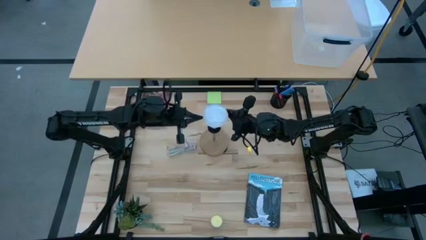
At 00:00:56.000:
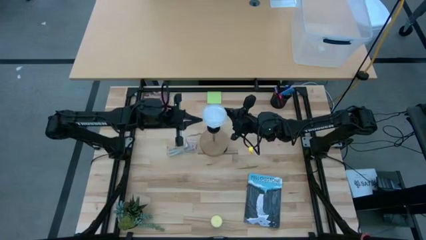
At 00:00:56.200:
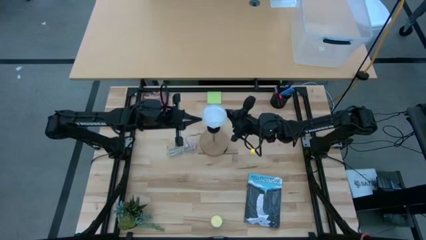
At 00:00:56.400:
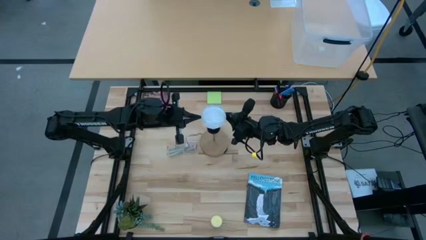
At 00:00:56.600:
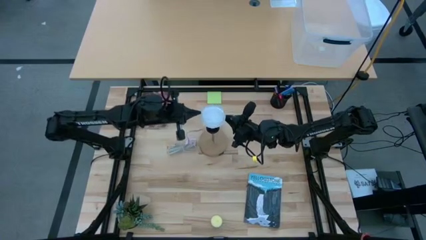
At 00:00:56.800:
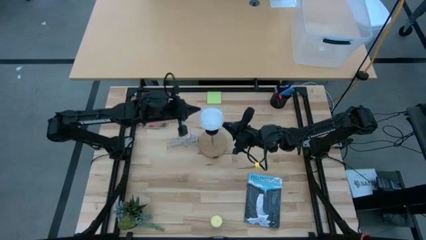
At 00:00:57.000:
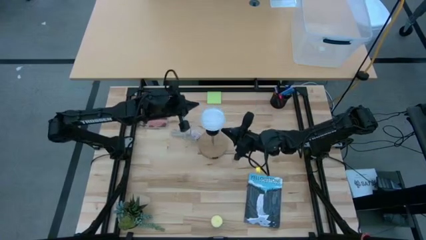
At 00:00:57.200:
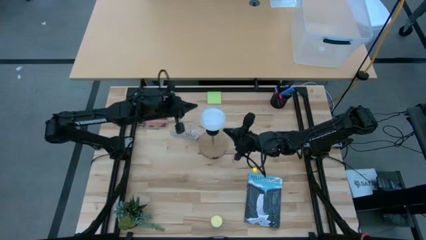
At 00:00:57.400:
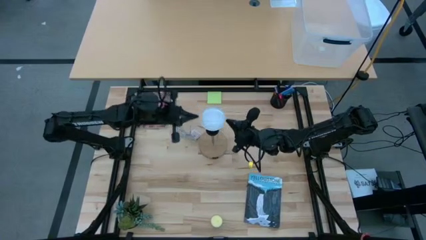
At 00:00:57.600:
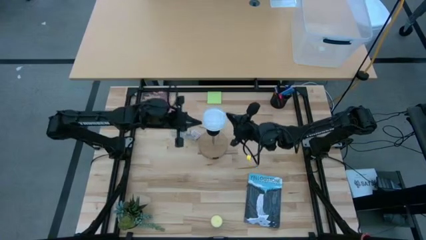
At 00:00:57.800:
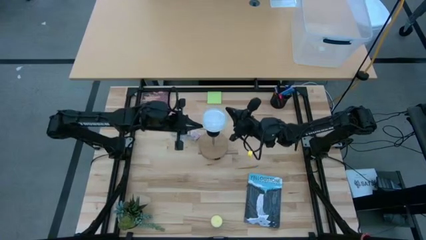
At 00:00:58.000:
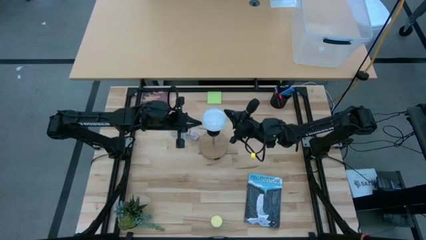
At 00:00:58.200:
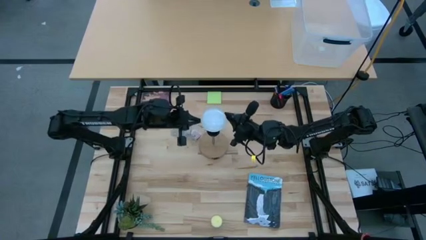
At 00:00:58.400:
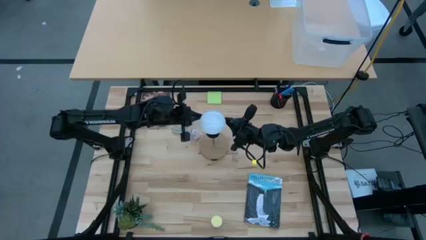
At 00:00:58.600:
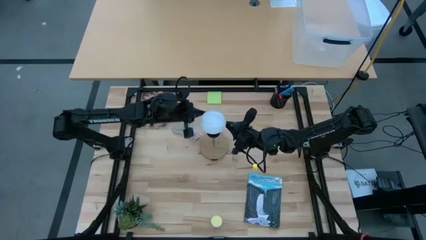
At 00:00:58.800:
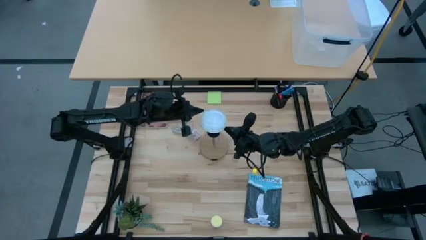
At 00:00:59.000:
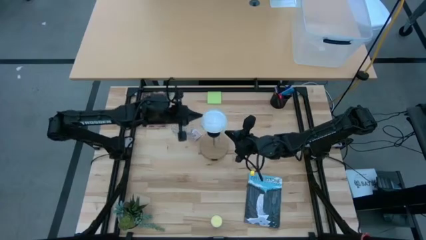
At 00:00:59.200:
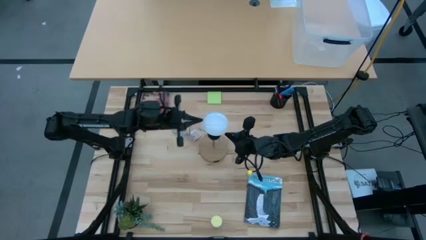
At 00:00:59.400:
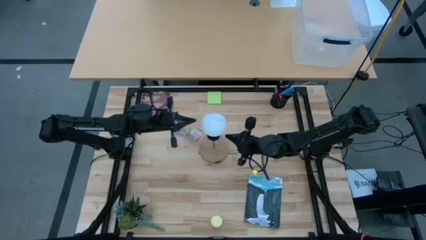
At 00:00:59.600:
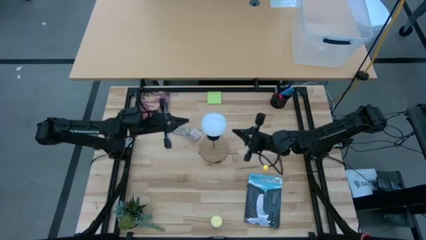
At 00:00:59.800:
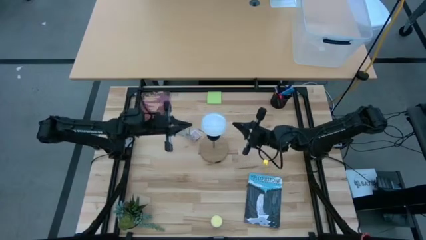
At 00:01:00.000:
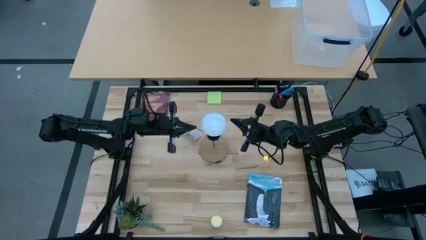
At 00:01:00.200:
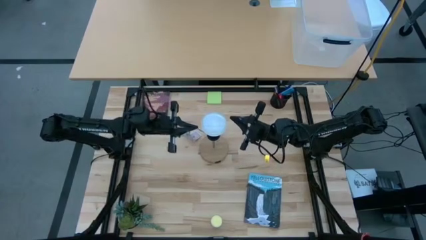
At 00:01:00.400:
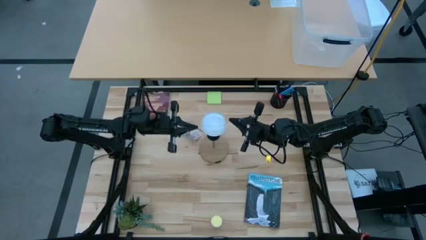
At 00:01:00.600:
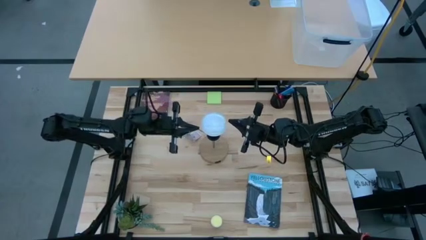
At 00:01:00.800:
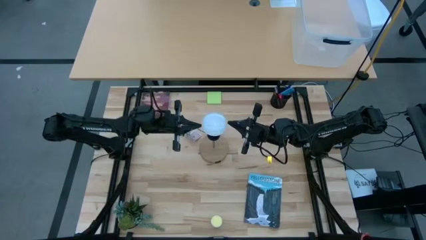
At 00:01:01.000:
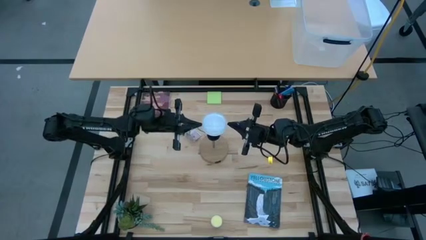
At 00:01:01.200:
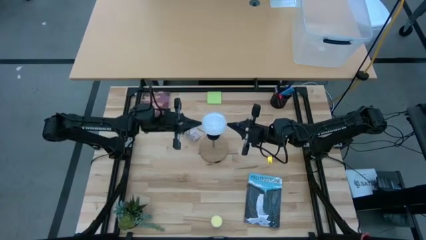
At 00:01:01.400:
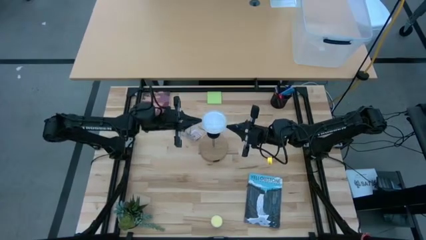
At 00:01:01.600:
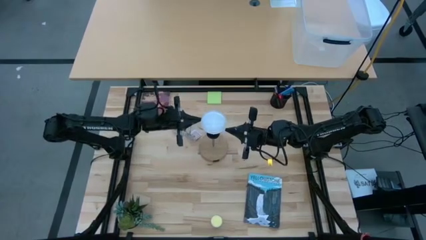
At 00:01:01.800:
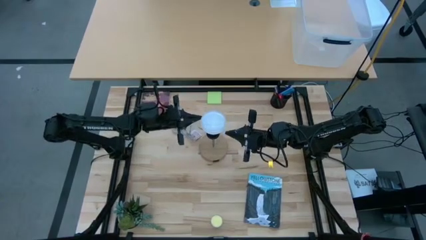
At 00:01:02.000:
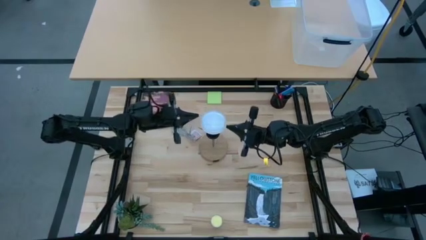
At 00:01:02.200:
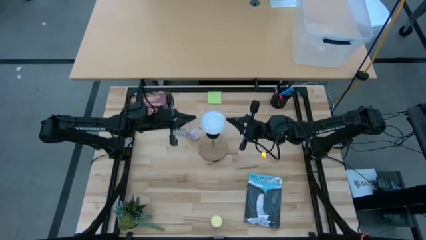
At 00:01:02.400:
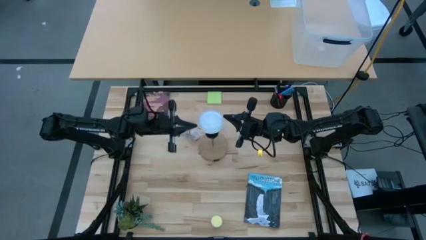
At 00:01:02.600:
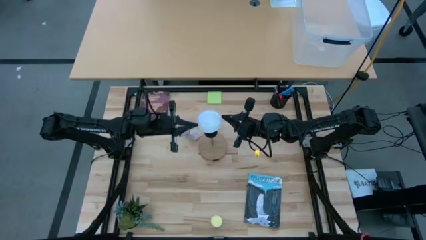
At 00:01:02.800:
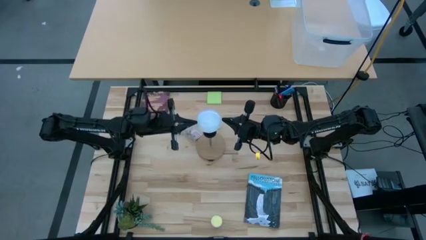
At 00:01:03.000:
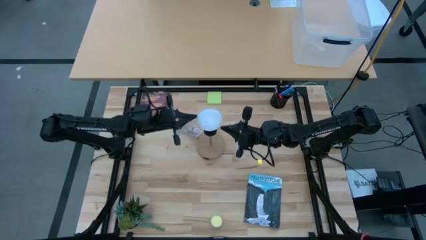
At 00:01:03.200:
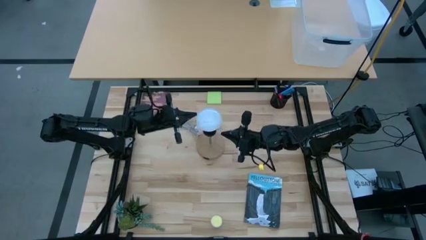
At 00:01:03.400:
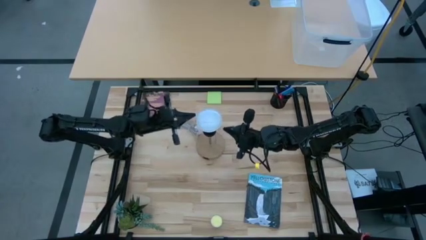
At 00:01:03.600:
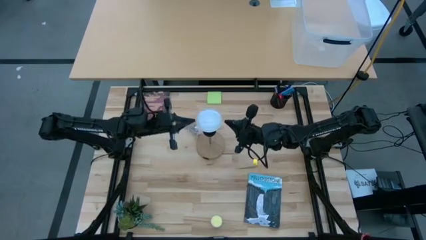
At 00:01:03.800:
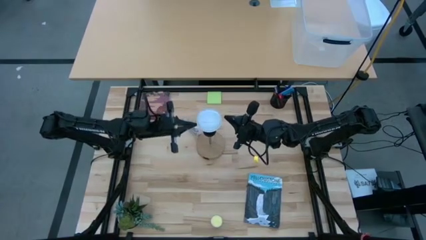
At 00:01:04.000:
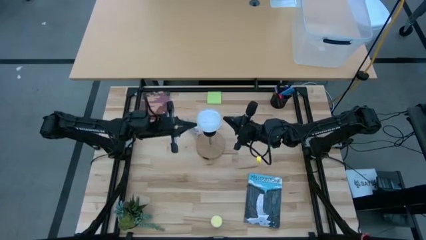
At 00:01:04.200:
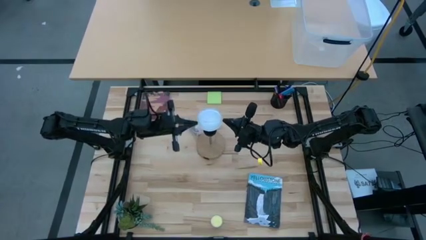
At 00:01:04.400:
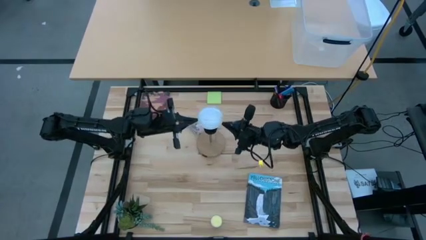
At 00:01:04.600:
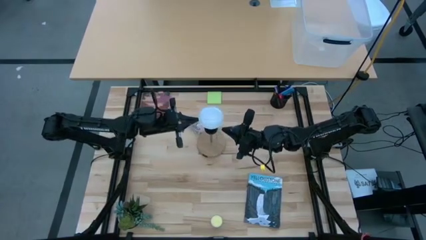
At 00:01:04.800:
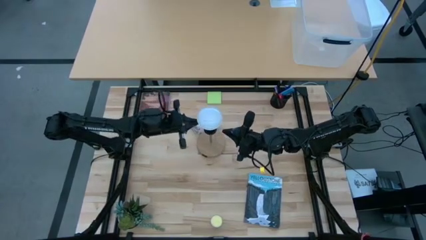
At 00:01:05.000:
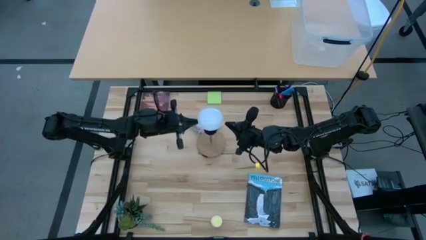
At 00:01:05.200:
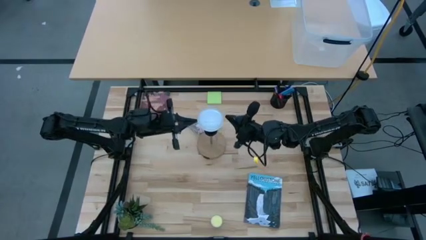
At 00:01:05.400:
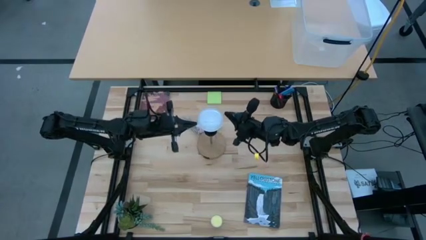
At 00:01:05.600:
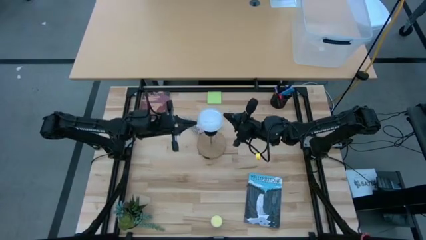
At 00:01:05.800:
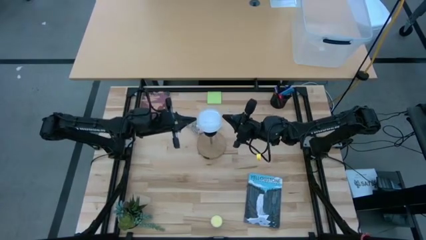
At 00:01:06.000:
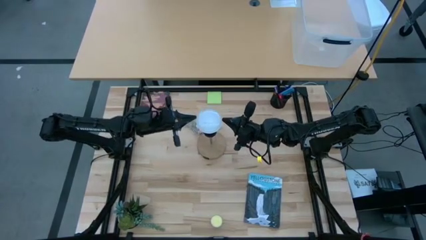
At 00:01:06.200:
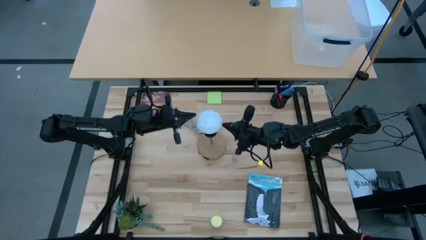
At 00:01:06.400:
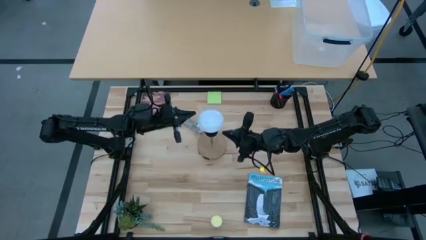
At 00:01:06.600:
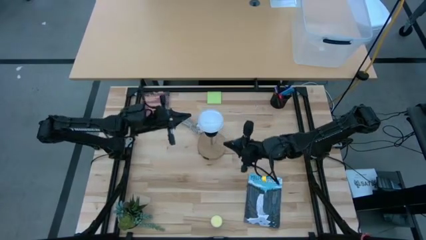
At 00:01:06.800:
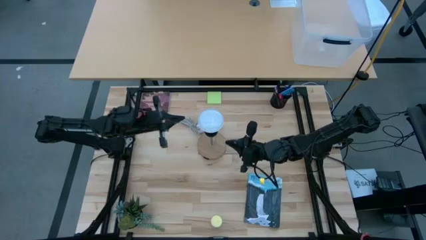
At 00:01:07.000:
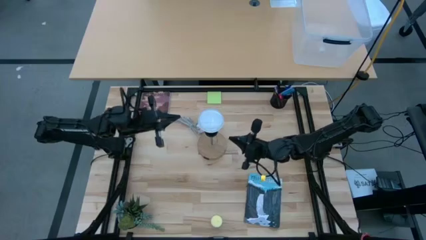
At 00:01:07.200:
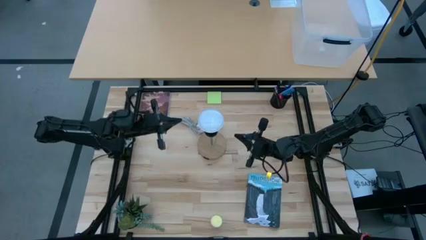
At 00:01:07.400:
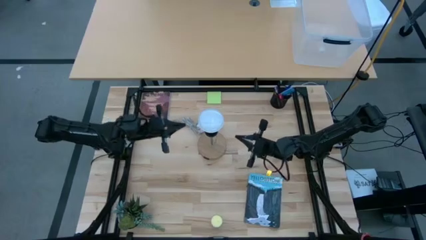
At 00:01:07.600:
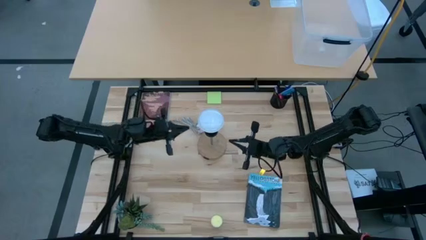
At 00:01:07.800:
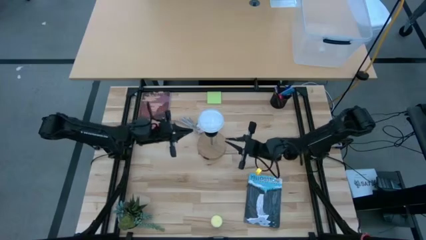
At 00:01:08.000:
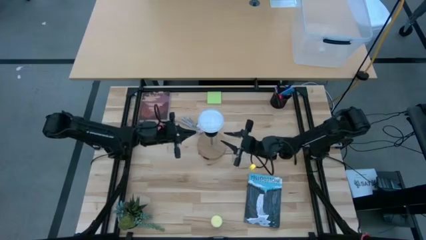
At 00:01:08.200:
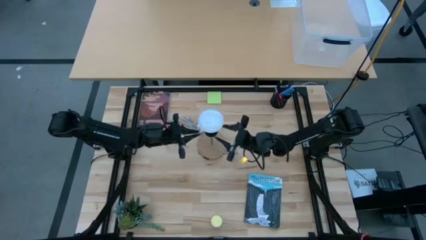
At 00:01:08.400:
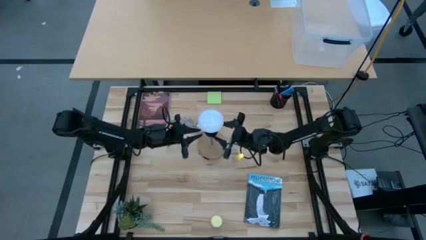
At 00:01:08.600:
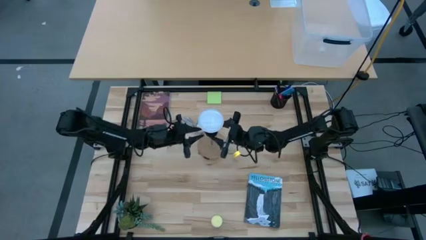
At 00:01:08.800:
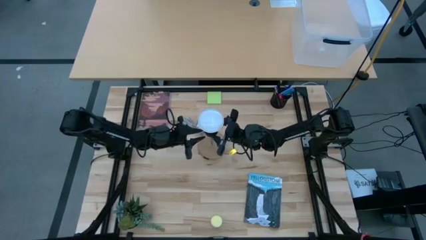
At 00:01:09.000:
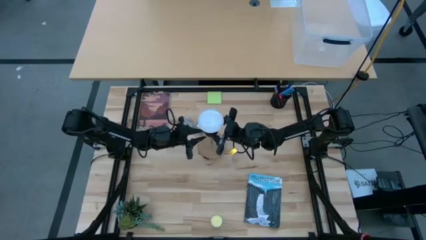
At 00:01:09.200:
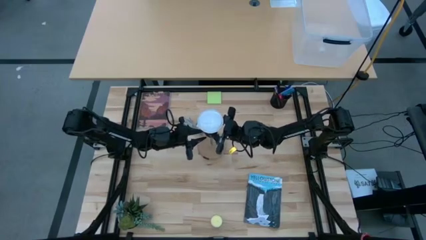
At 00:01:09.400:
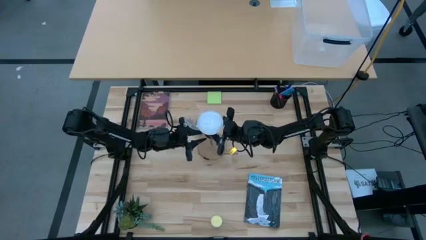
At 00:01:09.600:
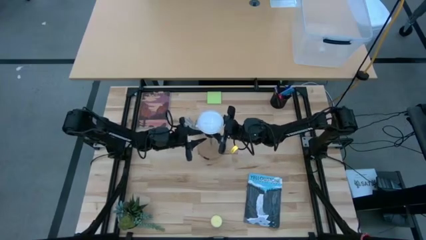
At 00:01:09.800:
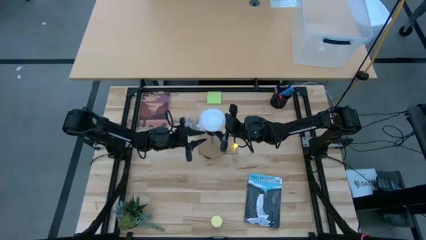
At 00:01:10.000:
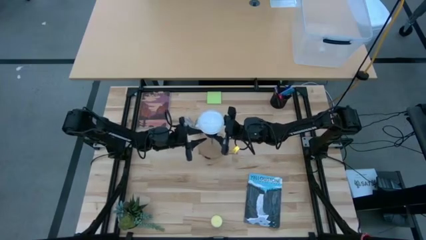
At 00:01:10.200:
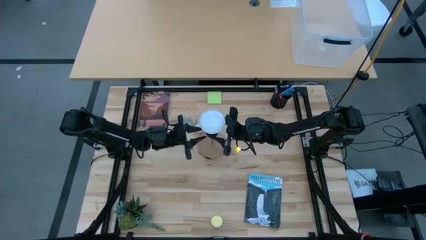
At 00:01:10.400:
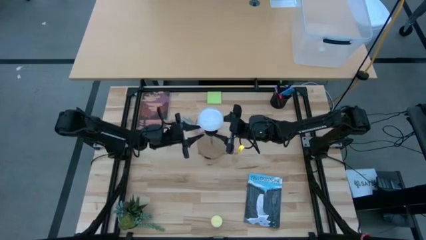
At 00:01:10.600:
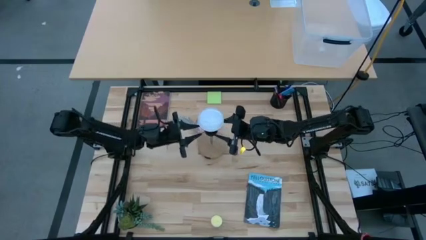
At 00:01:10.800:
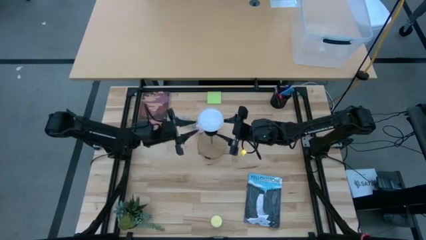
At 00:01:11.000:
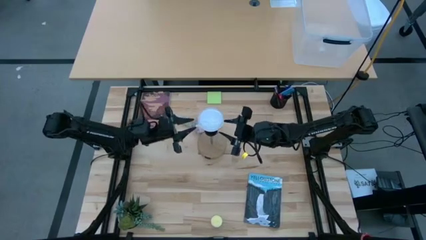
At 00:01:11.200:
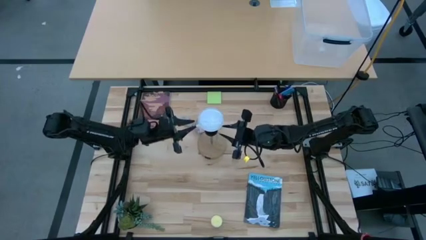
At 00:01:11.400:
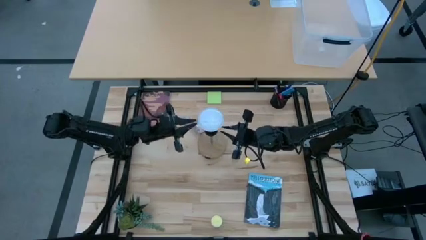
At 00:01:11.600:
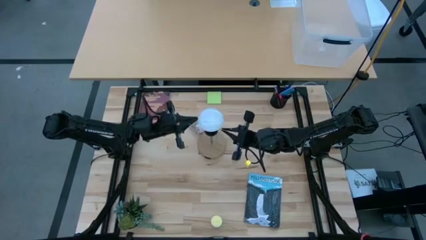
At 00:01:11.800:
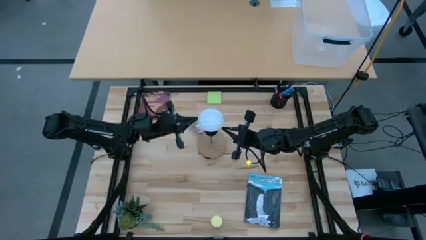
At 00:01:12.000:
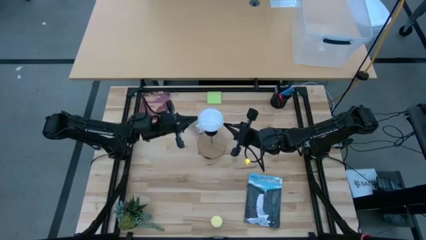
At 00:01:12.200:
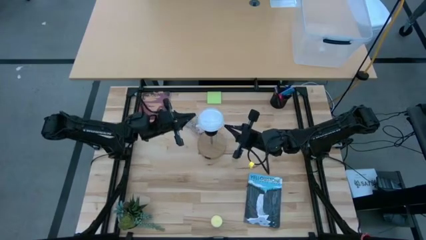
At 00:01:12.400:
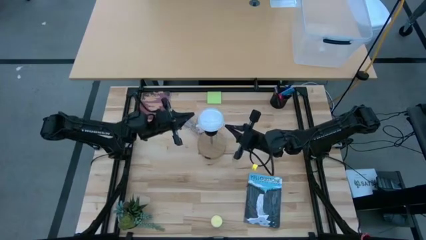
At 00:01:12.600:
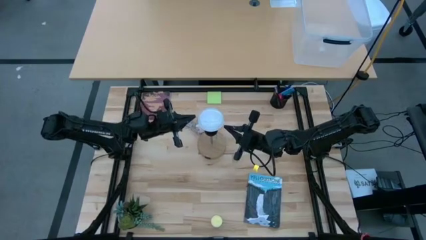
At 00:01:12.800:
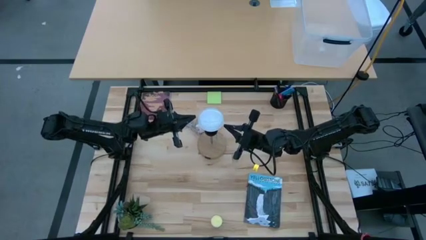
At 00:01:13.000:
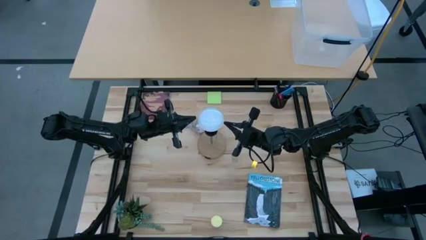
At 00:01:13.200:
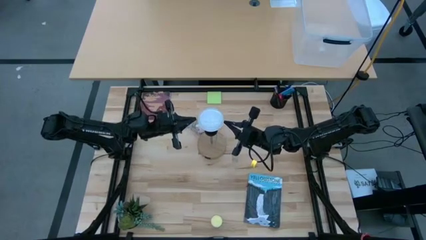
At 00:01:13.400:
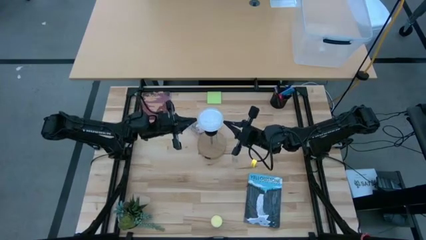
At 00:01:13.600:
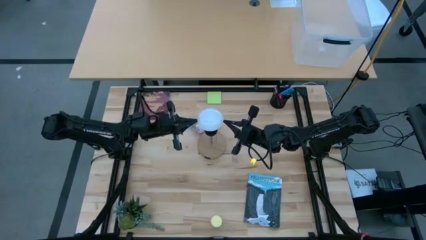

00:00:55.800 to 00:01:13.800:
Task: Screw lightbulb
Insert the lightbulb into the lamp
